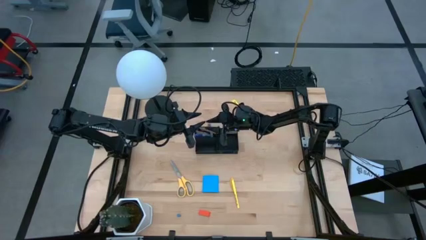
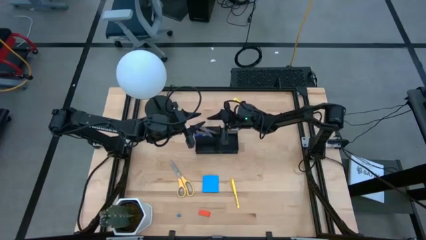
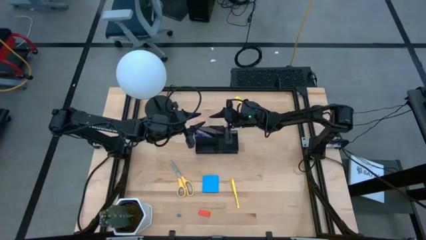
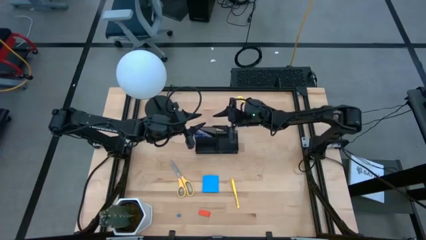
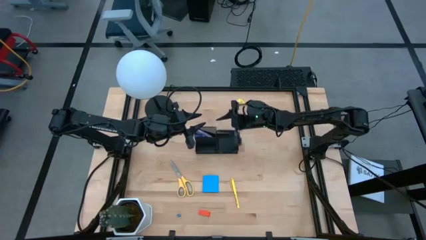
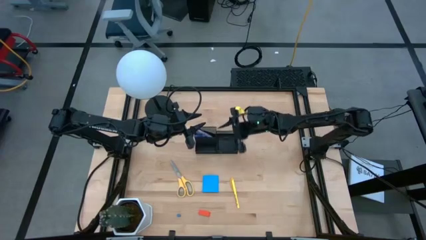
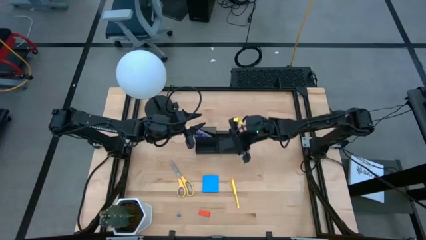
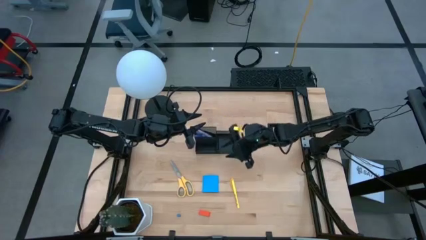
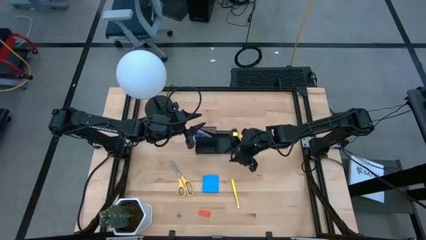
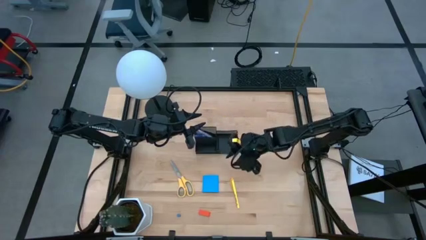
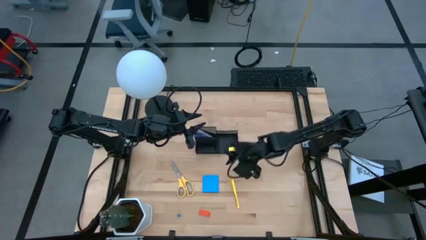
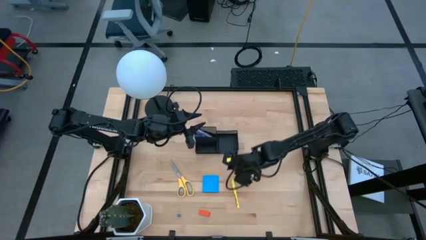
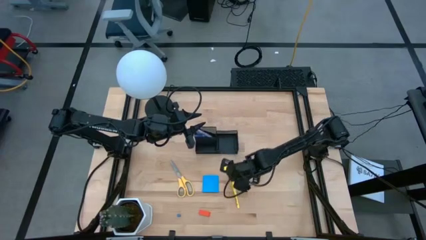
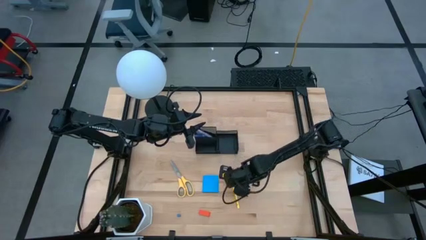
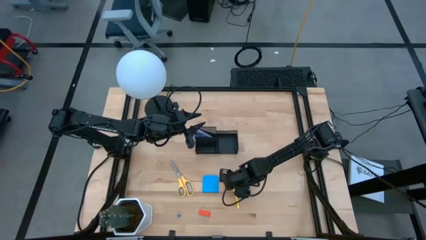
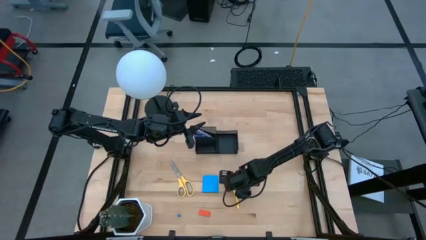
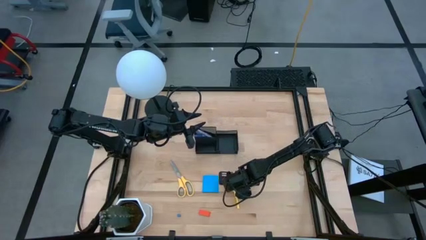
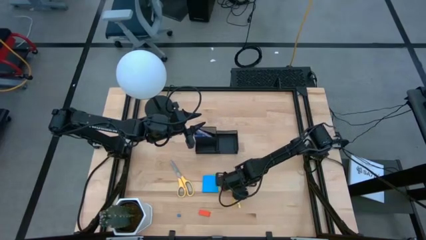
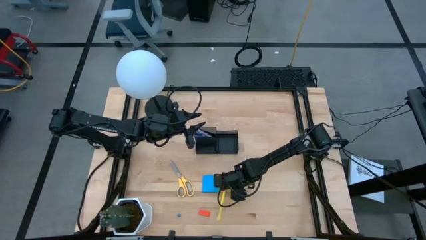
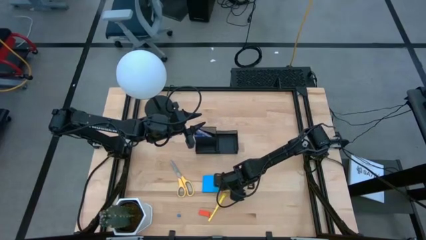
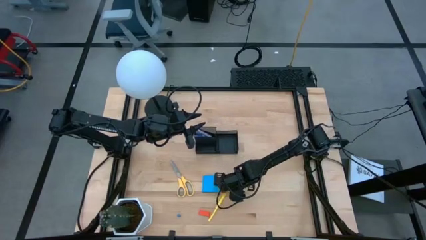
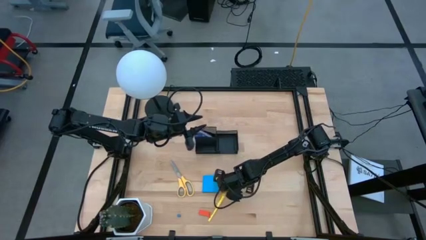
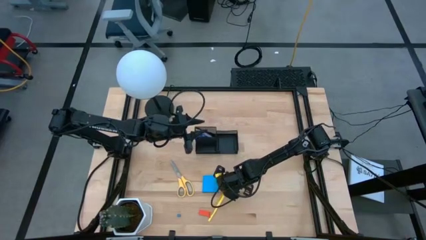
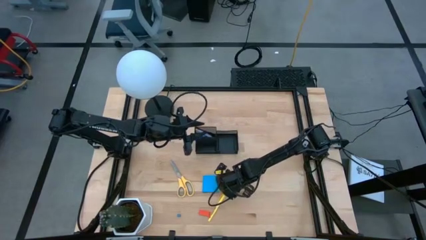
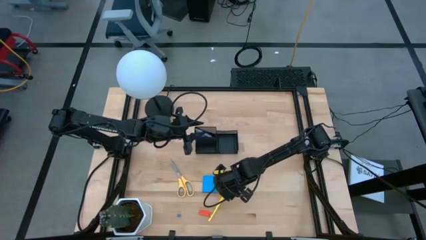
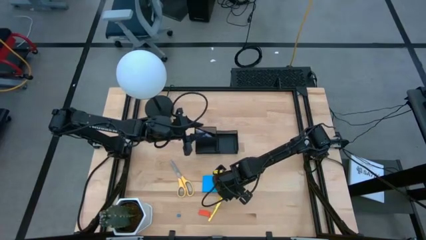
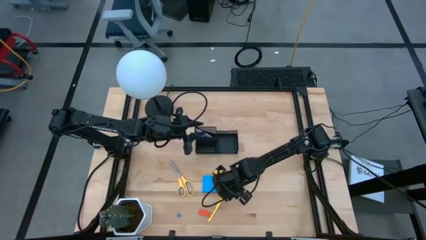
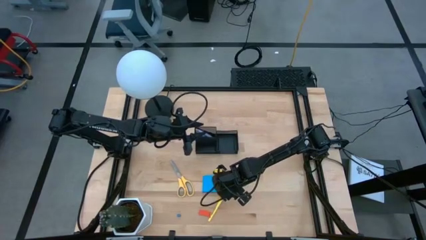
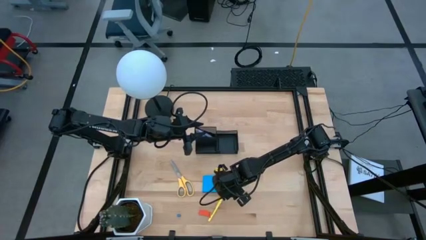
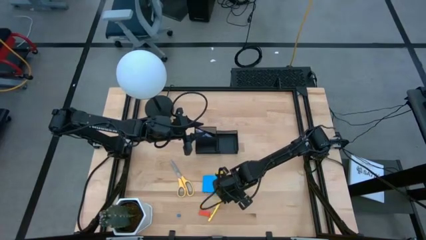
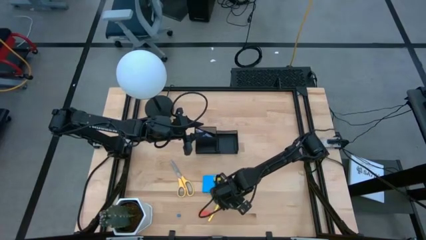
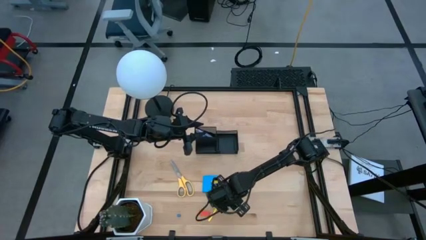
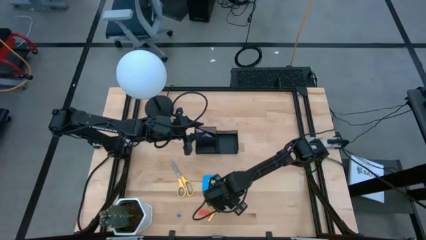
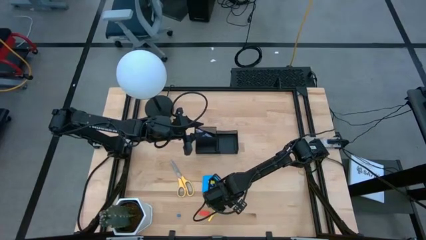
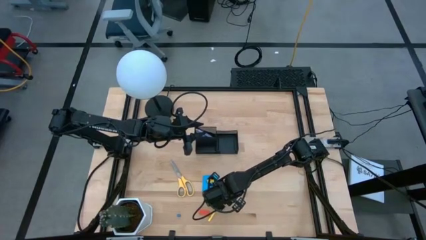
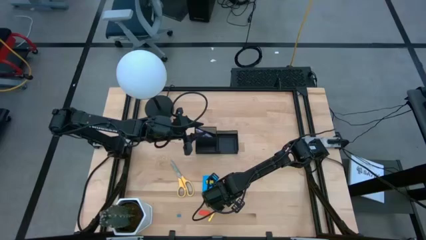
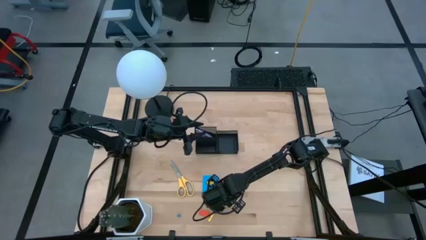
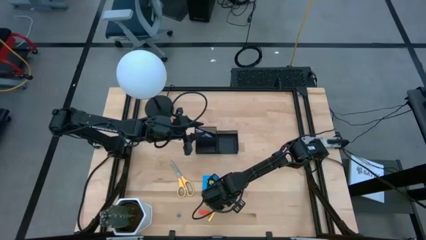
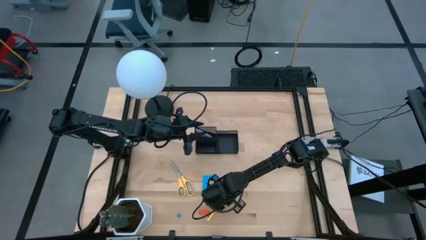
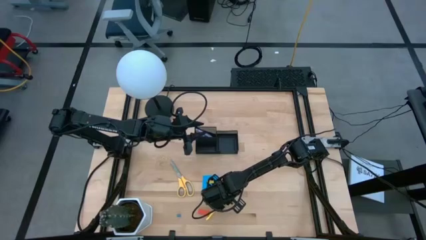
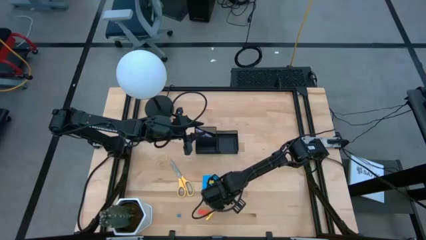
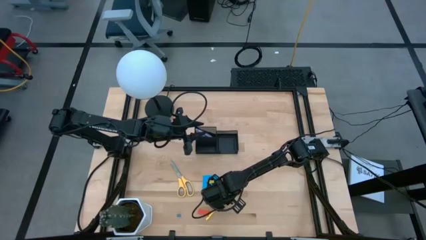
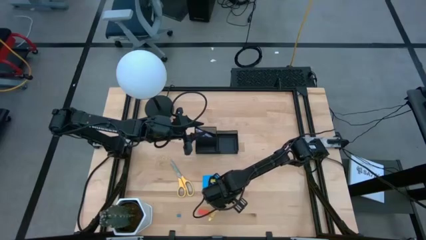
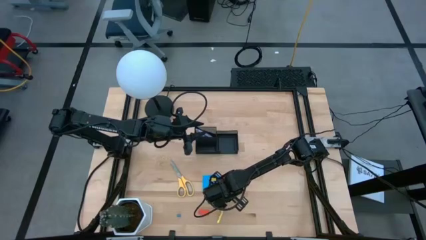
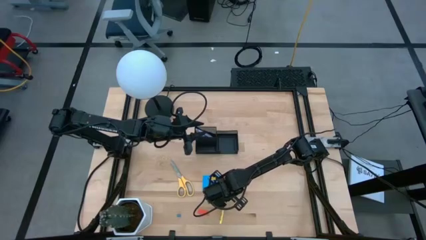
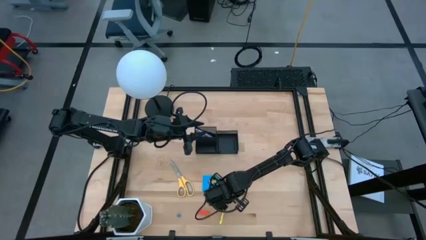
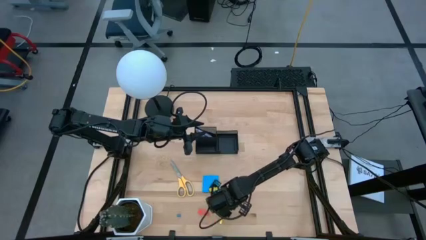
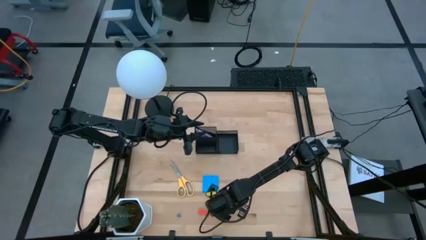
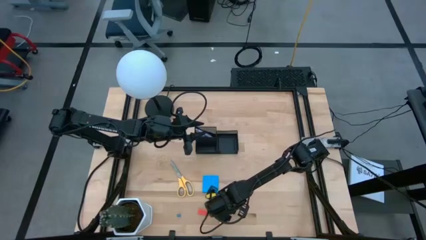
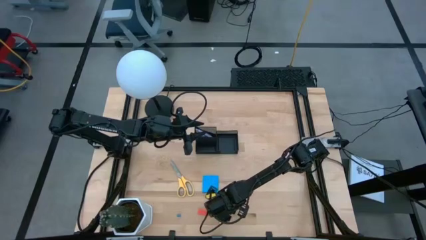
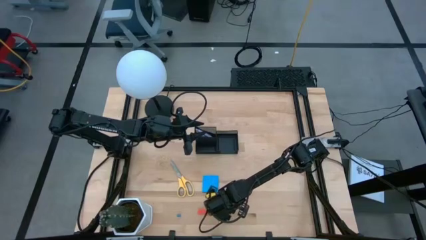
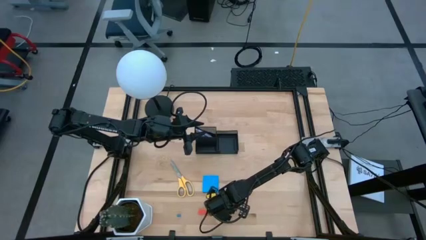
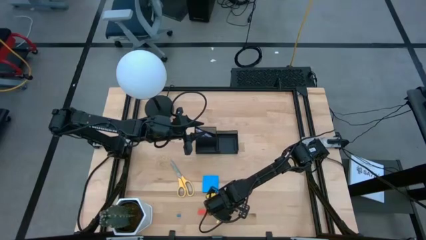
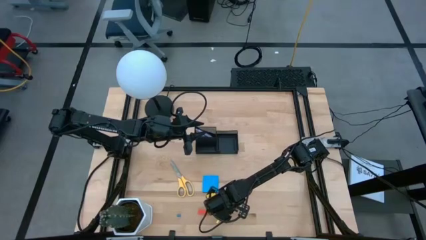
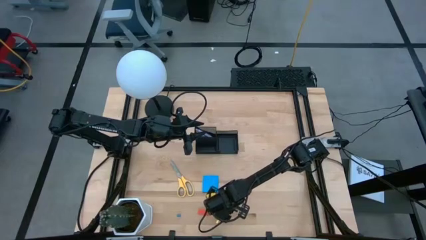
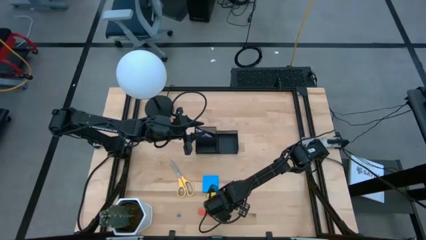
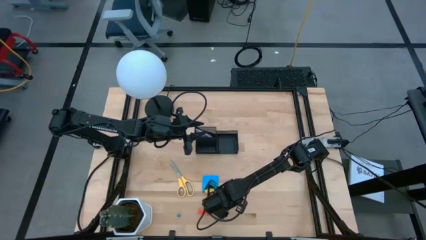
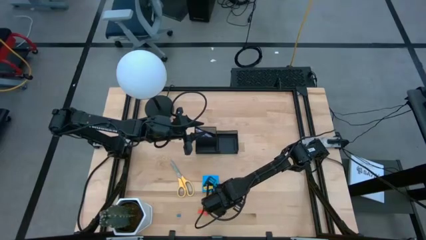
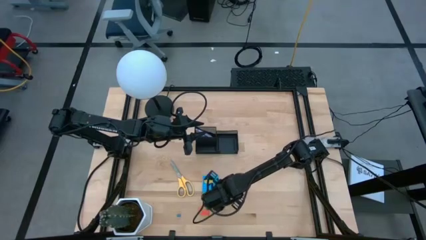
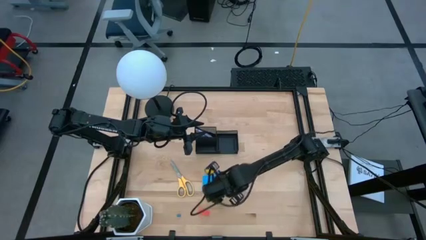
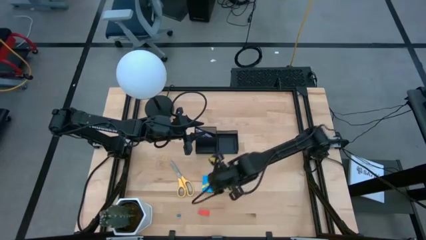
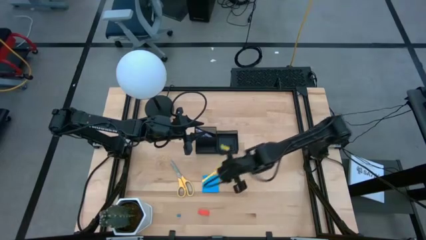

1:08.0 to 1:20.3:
Task: Pick and place office supplies into organizer
Put the yellow pen into the desk organizer

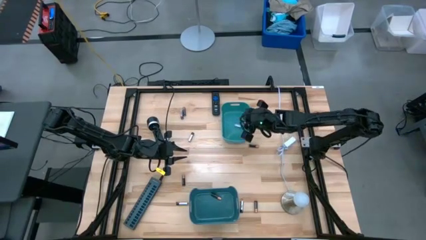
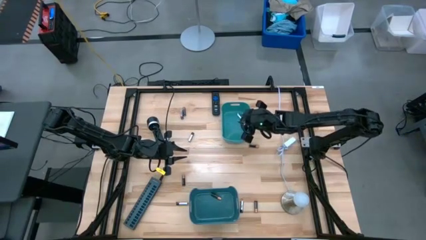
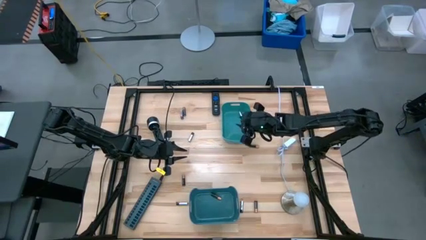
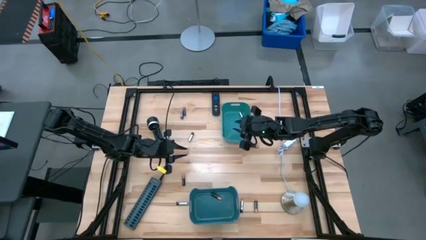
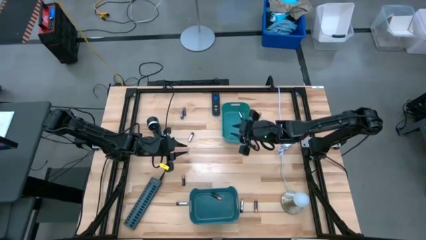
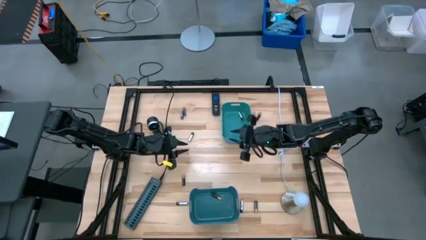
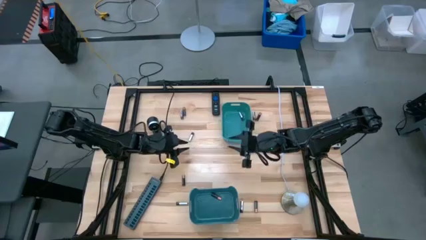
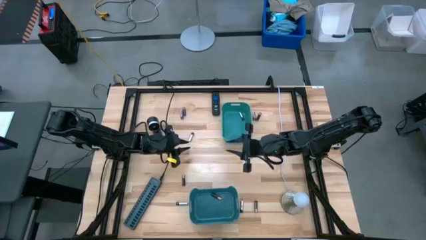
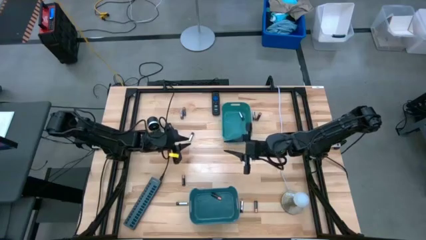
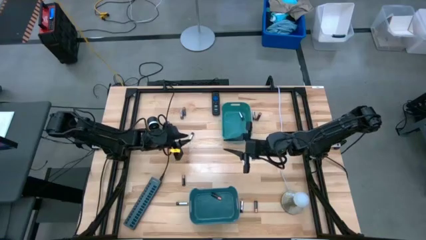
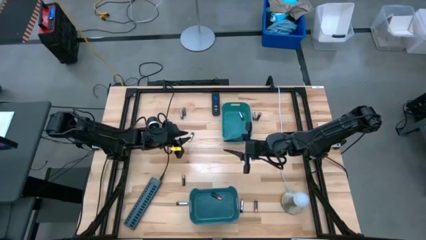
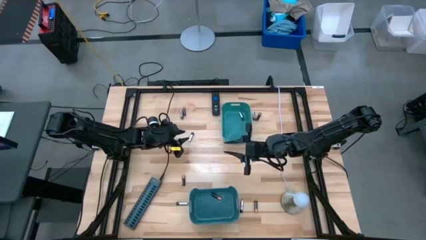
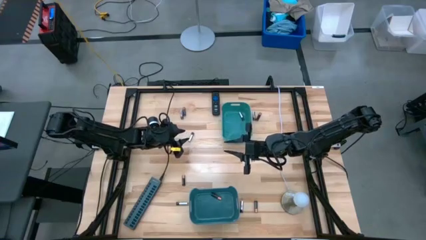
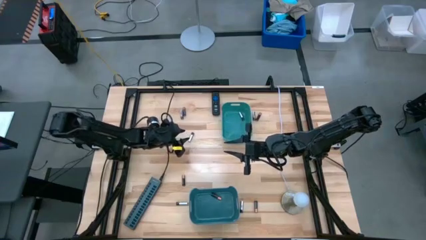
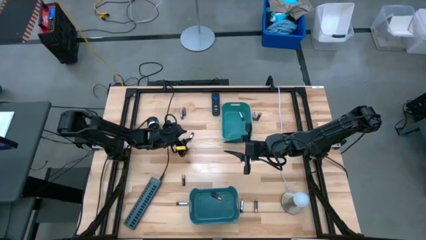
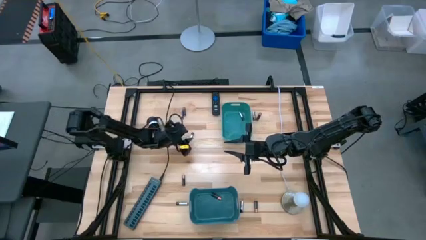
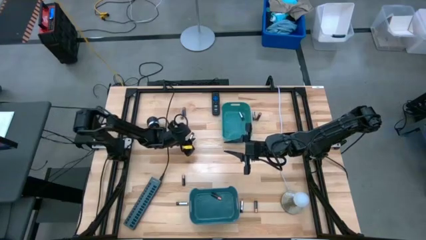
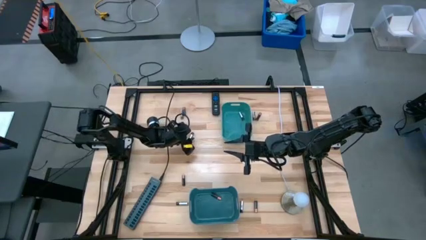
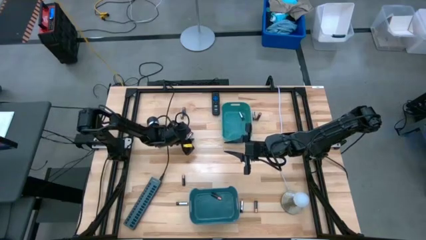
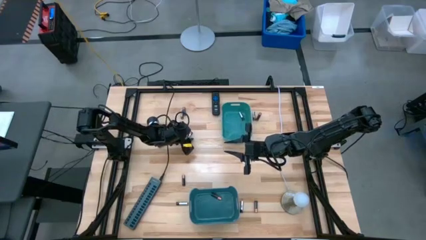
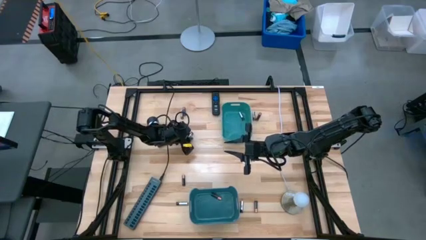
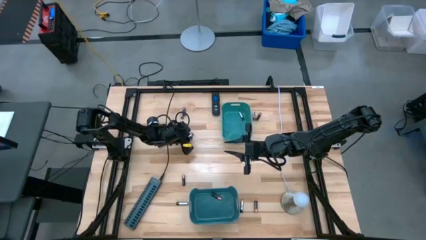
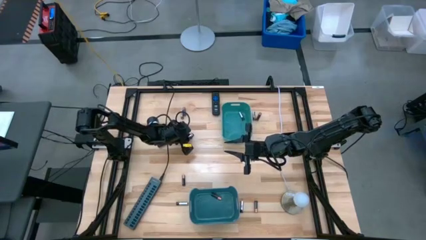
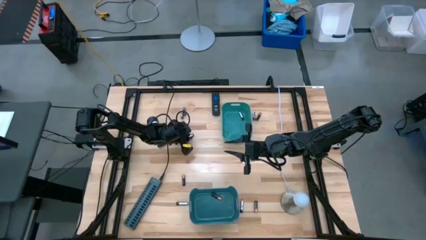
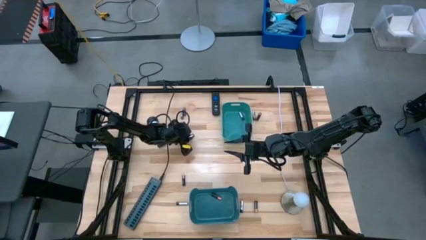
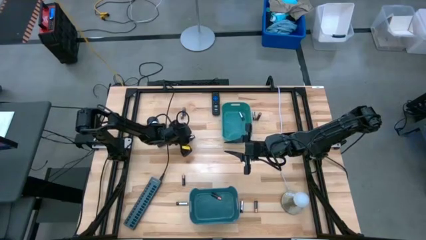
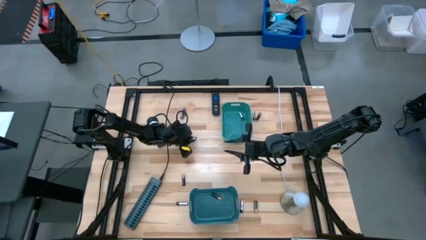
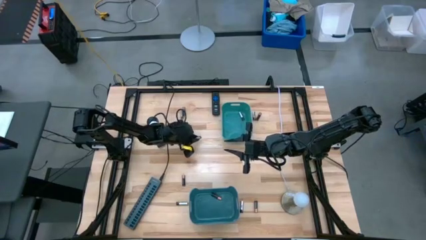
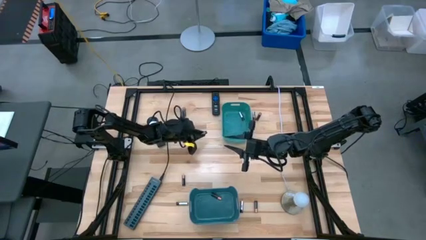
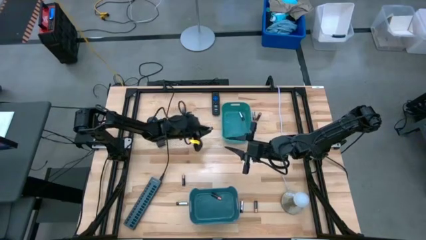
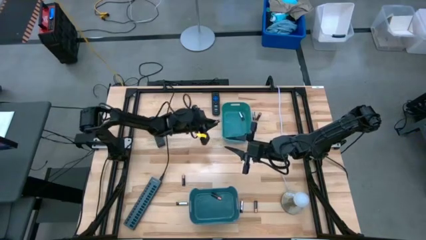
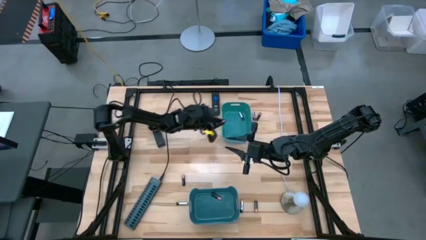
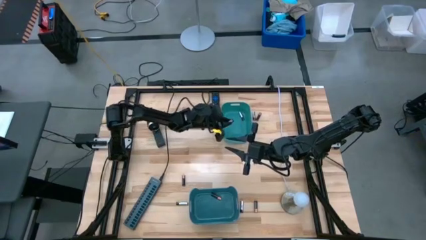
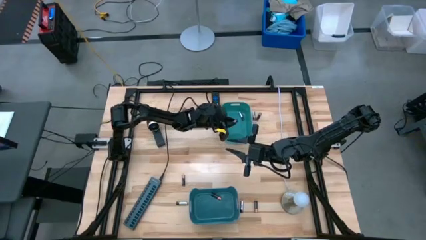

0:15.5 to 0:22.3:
Task: Sort batteries
Put the silver battery into the light blue bin
